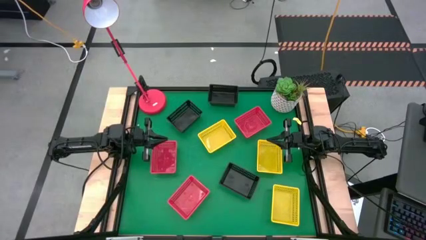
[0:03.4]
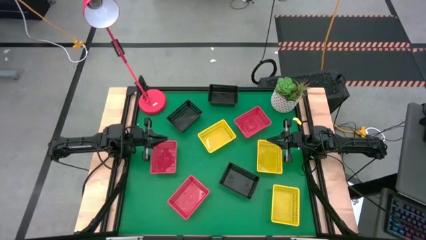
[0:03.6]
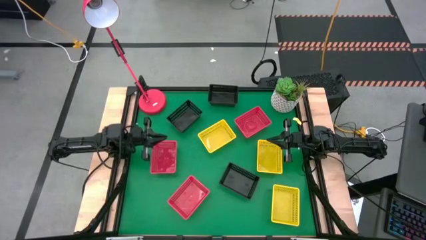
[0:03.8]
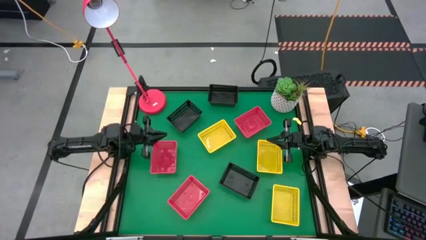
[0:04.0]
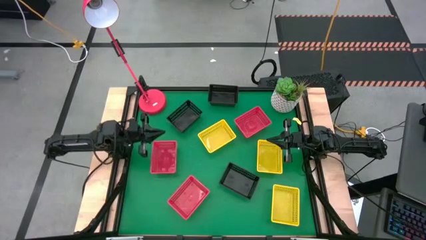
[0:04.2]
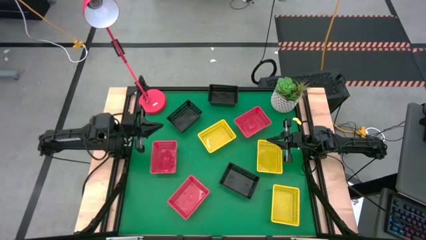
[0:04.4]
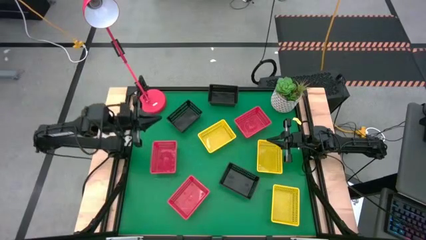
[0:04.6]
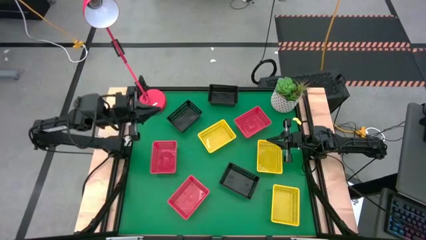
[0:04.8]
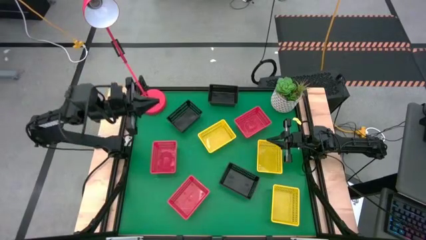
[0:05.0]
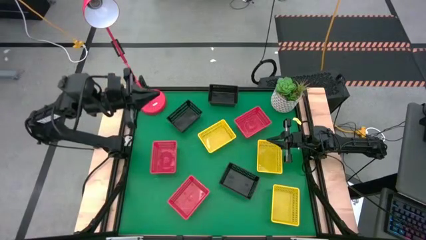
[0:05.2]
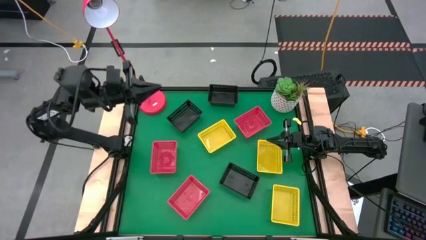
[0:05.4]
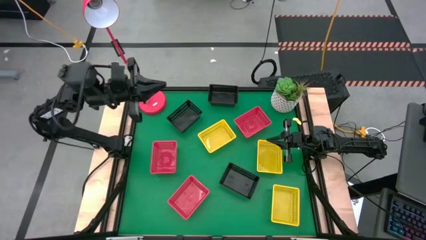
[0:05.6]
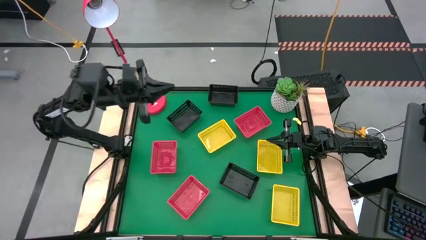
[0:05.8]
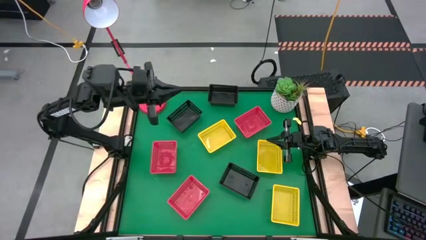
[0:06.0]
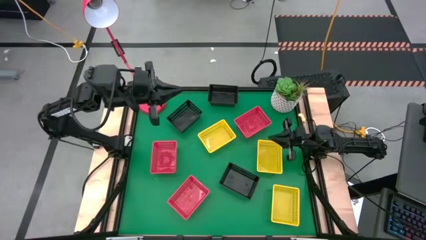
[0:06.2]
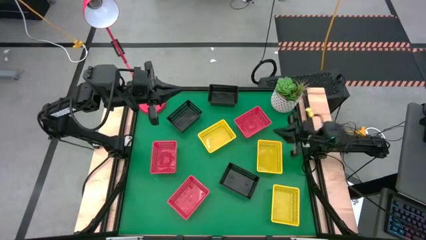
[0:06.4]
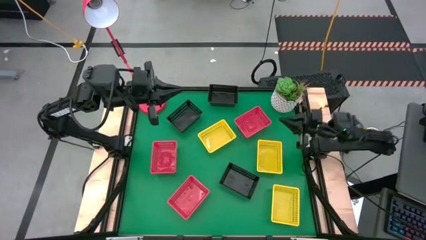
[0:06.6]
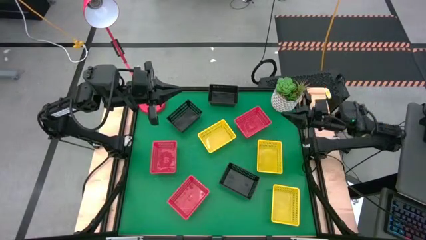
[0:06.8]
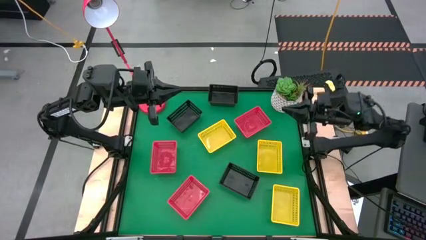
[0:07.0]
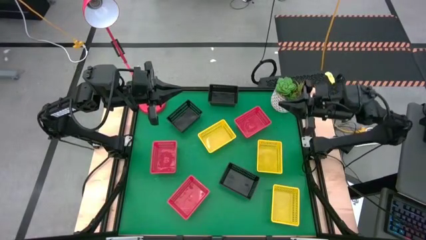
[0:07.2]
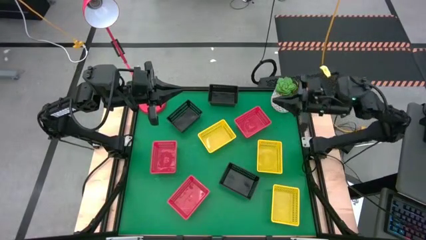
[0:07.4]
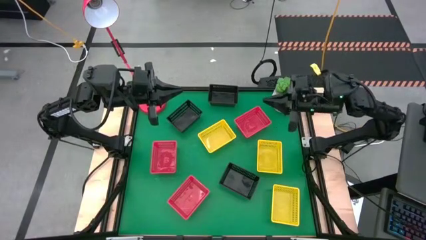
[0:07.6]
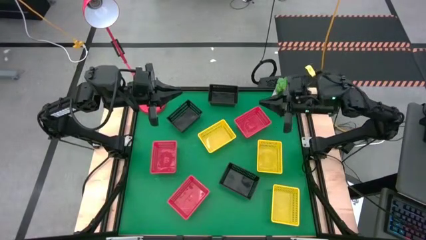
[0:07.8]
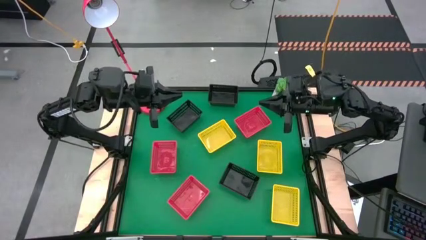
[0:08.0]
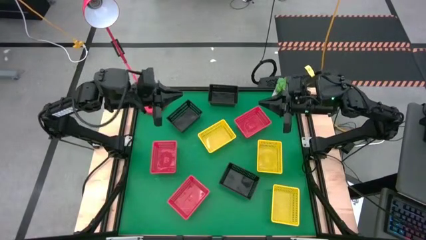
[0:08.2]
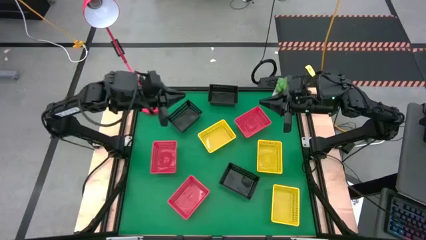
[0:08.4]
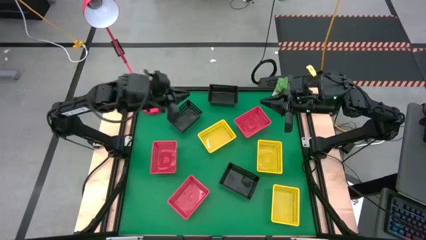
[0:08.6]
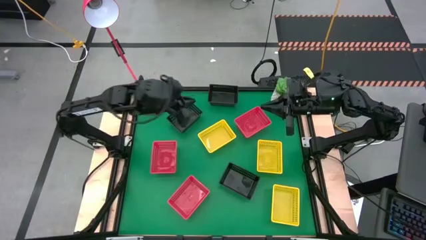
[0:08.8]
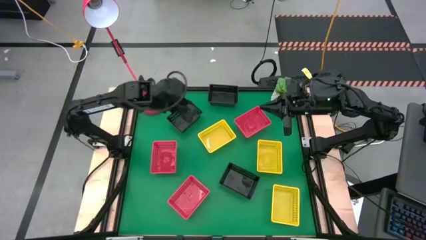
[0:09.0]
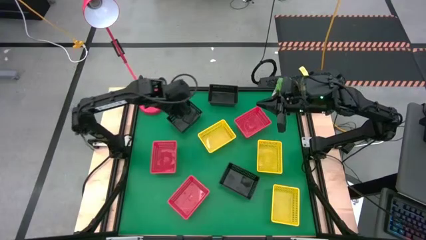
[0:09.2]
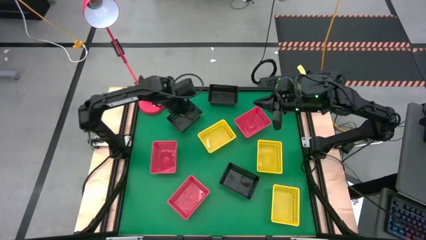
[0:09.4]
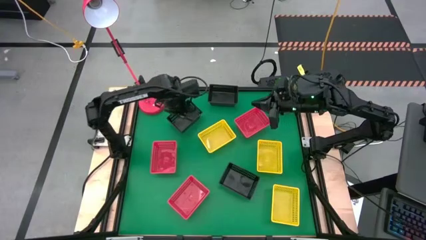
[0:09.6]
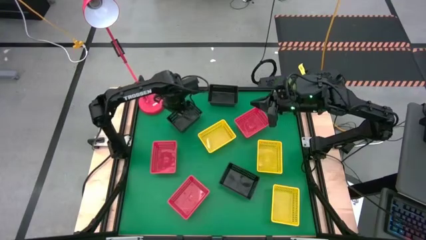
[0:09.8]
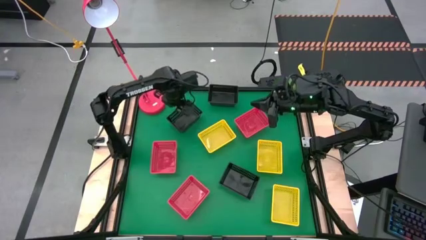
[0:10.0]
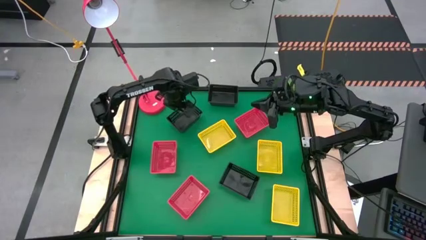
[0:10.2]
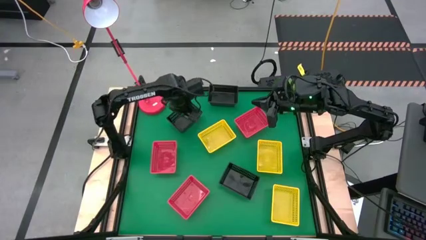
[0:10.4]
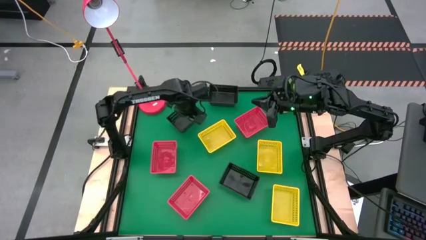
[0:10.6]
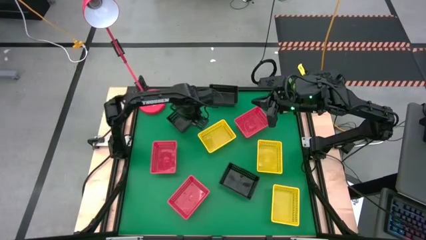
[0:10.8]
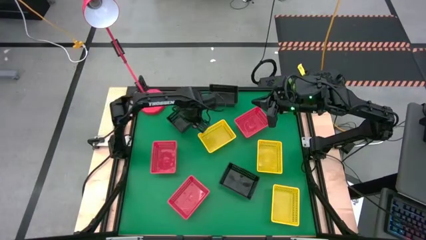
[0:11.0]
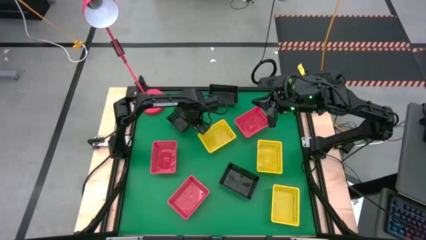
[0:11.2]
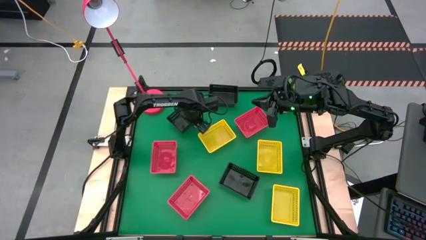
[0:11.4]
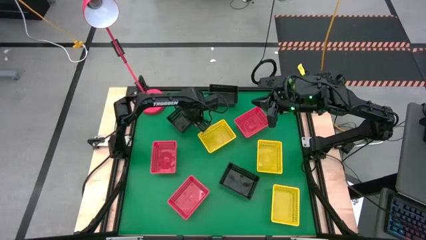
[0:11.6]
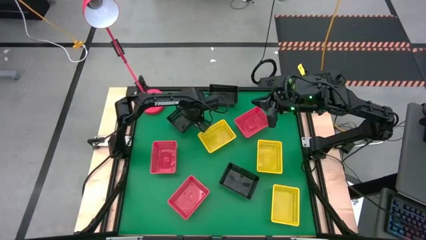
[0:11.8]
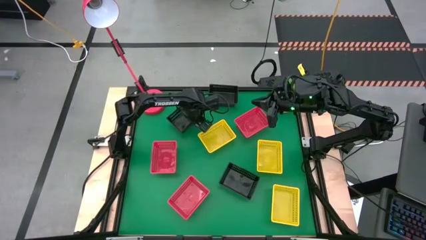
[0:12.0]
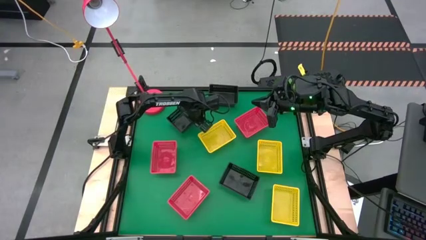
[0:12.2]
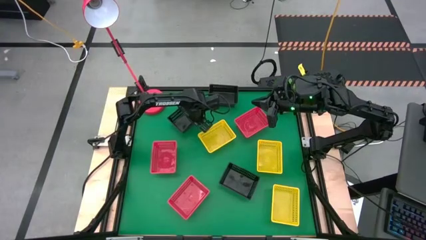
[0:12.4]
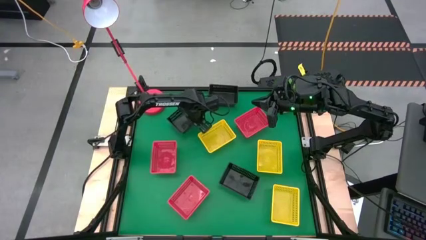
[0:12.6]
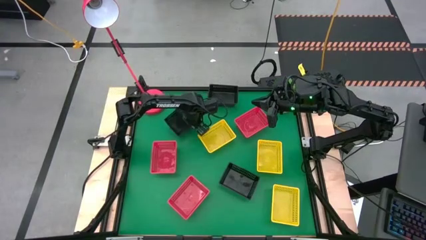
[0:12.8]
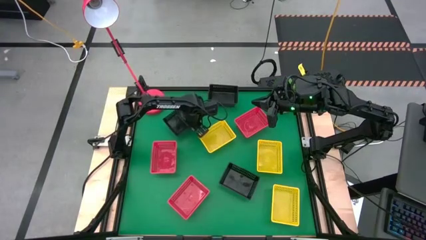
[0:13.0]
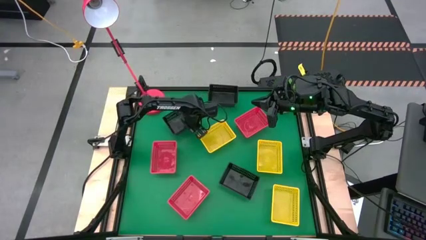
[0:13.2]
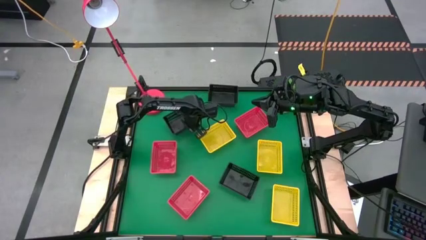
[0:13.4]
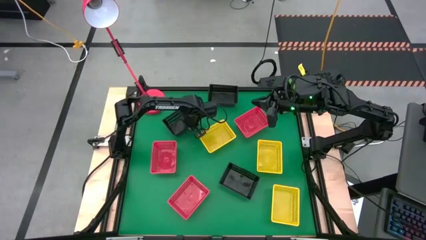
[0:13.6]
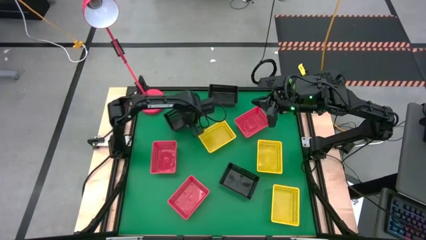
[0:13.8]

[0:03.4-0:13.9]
Stack the middle black bin on the top black bin
